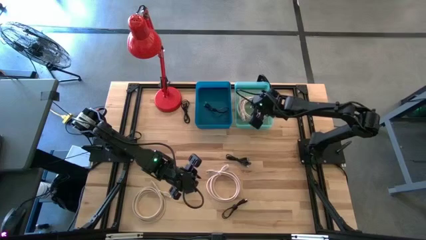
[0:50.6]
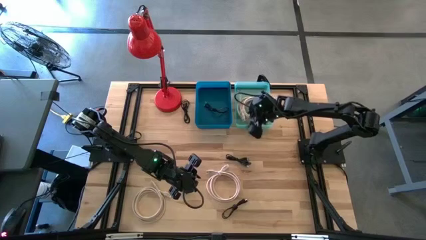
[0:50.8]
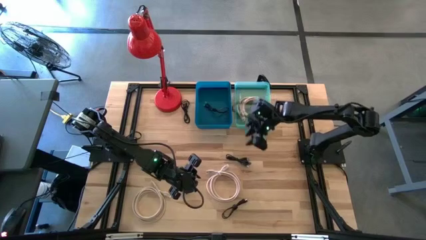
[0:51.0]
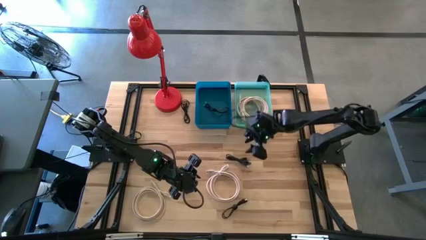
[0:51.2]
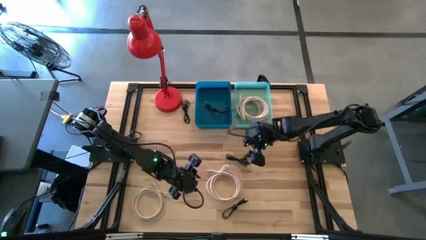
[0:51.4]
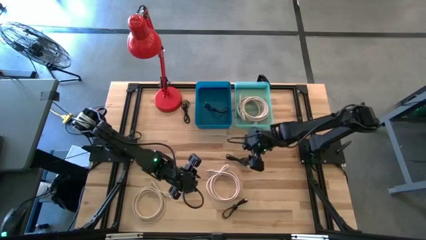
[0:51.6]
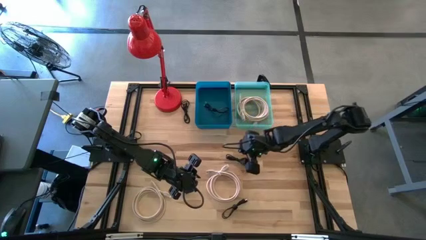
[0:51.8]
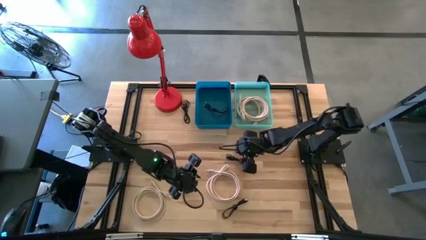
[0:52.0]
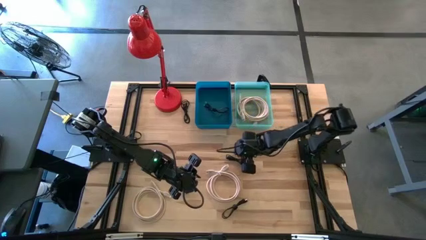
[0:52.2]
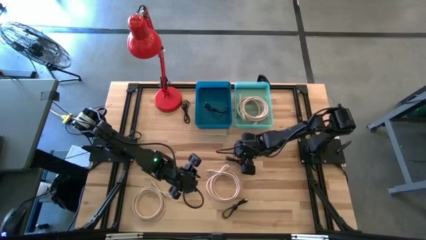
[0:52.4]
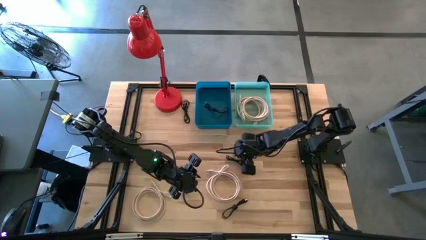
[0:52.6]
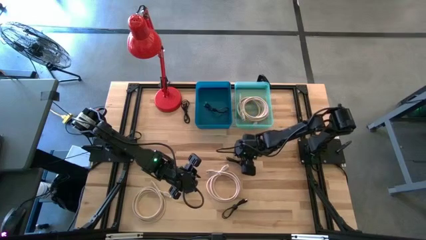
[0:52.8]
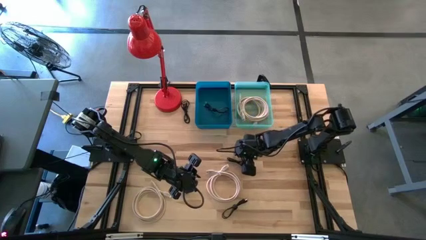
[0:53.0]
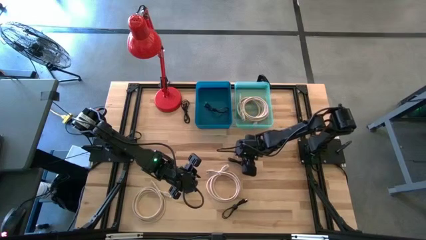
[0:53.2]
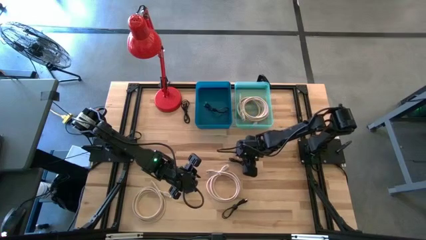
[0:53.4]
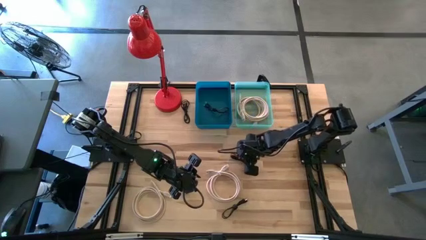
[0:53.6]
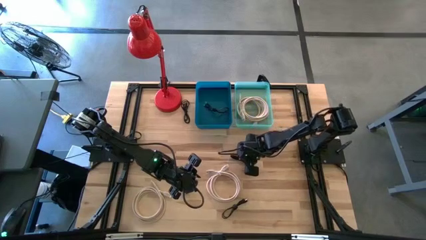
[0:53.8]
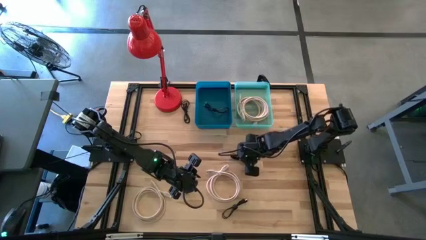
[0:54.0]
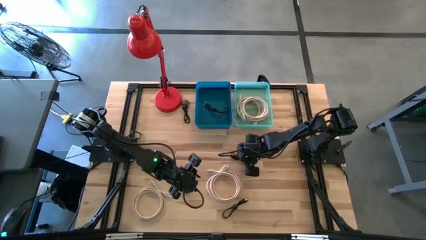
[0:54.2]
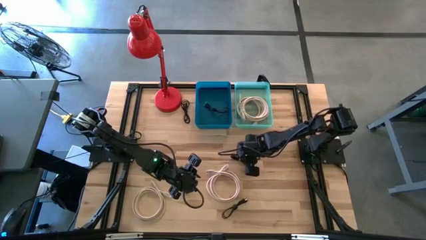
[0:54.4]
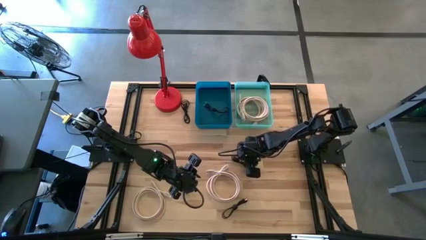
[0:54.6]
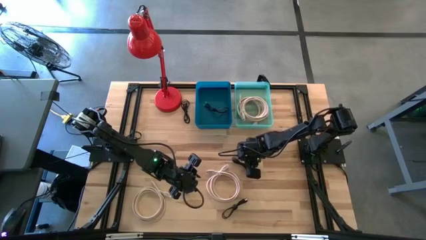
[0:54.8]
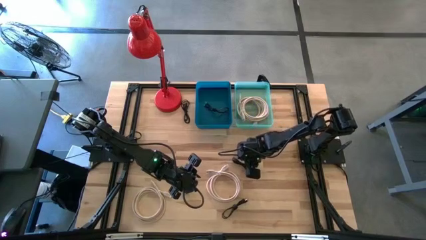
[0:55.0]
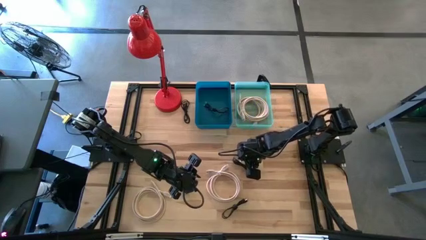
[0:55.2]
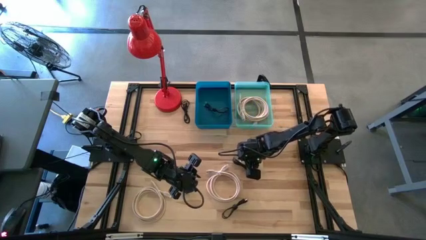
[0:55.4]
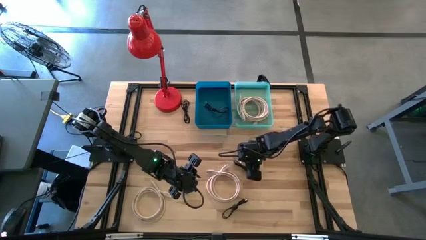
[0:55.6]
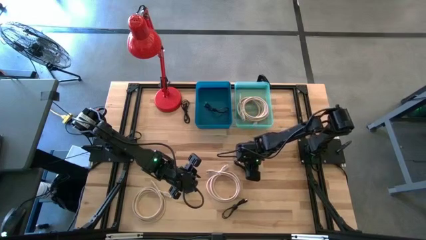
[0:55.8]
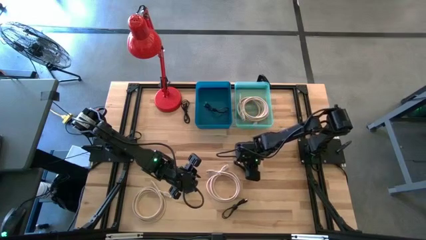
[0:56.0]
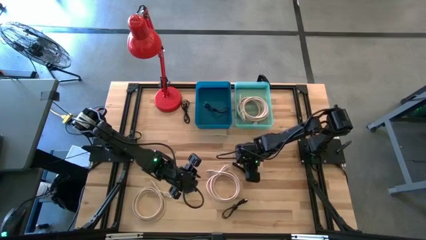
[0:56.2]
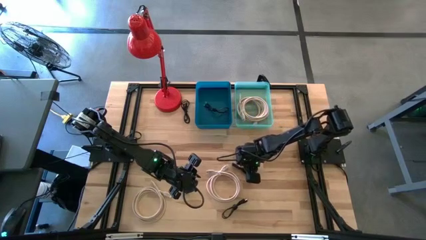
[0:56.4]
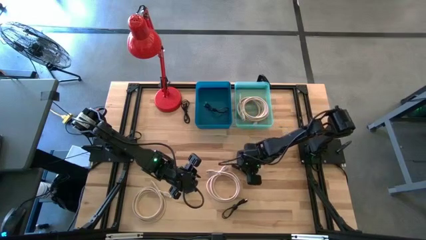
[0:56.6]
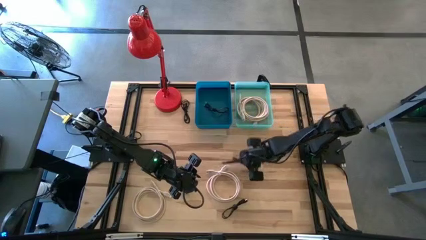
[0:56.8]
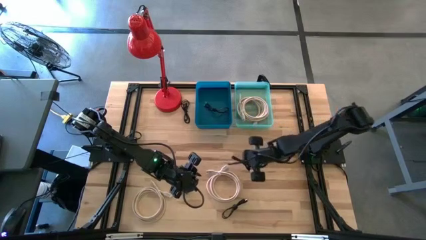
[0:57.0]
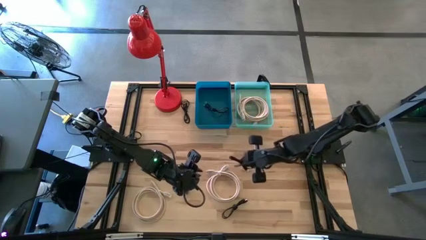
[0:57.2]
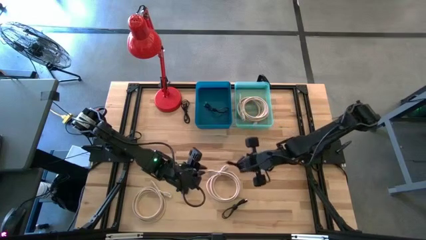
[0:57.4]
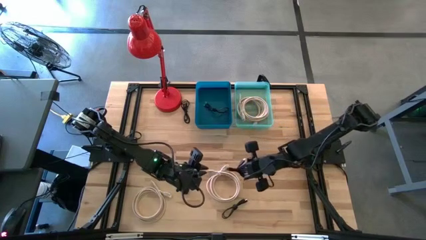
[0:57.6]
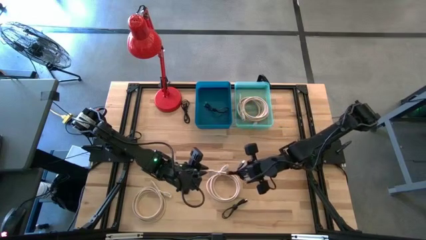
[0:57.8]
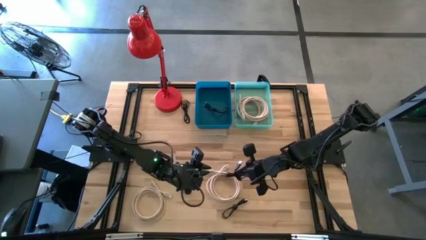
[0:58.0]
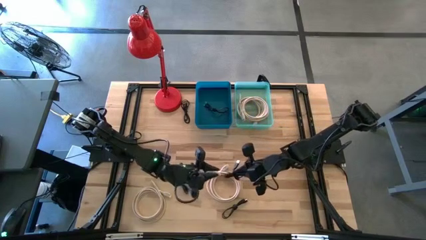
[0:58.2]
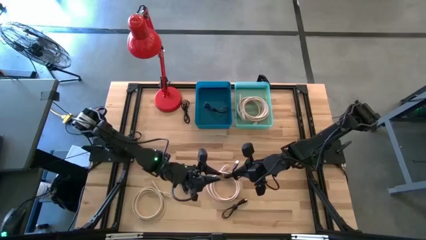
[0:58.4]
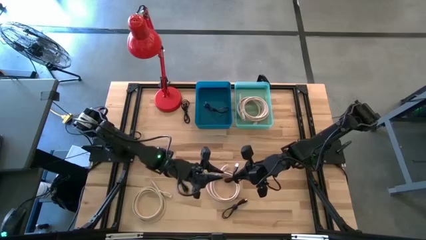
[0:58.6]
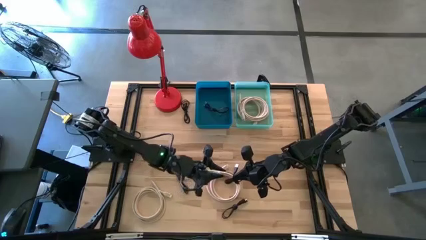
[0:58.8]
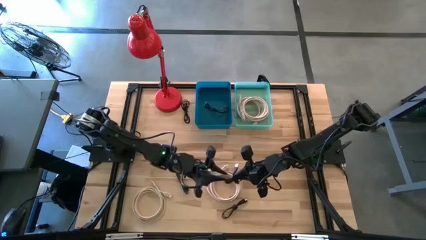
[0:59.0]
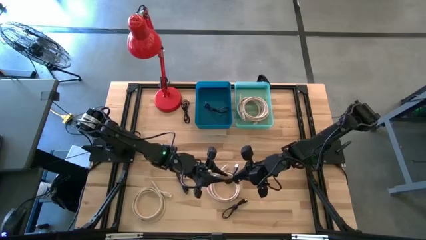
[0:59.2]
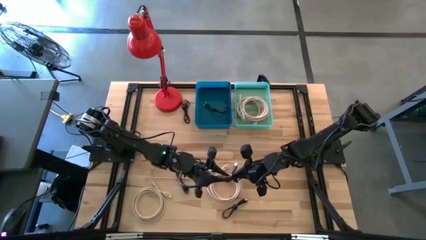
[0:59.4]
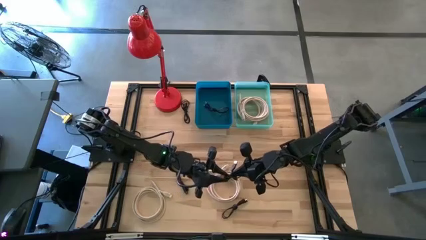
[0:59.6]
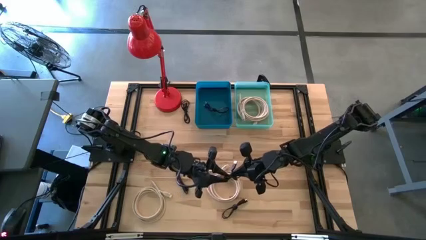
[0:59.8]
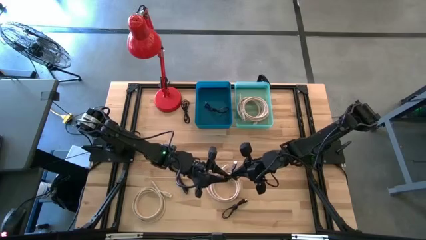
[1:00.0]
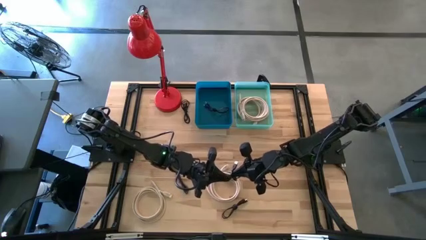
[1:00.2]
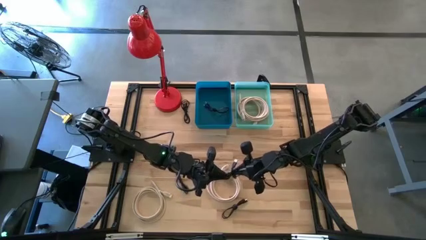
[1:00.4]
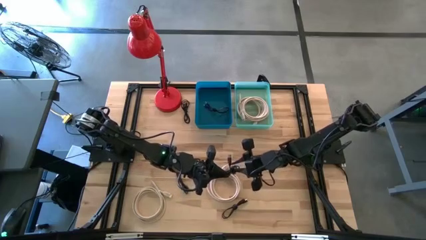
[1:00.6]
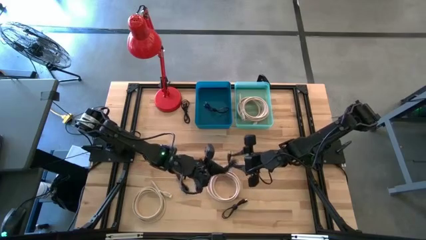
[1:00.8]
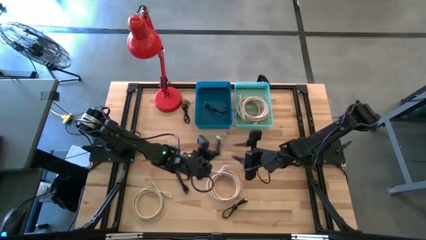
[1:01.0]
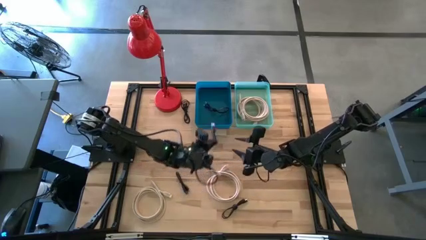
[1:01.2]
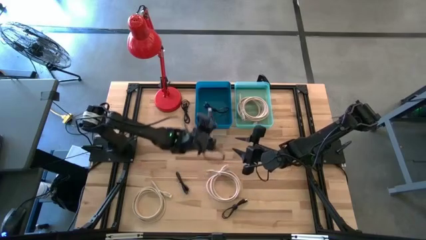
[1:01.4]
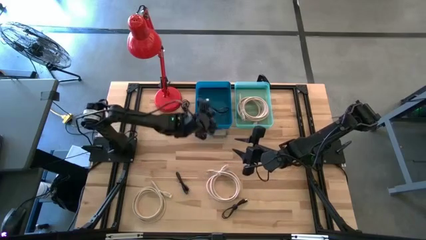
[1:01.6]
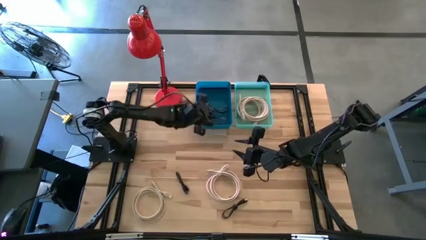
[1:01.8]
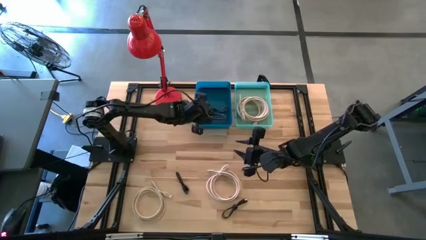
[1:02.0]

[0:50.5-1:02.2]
Task: Pick & Place USB Port
Put the black USB cable into the blue bin

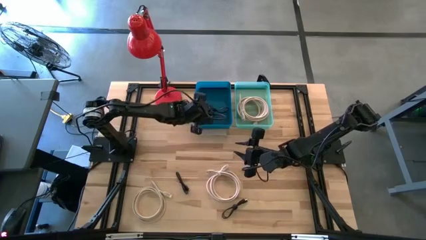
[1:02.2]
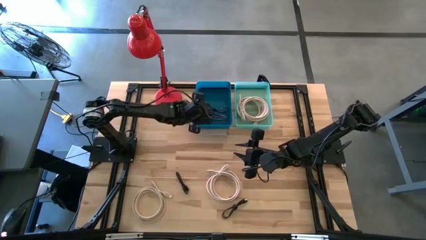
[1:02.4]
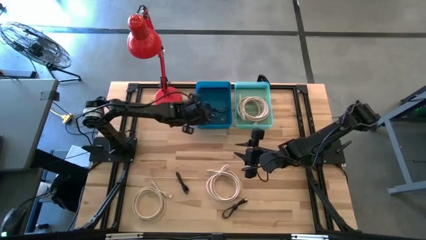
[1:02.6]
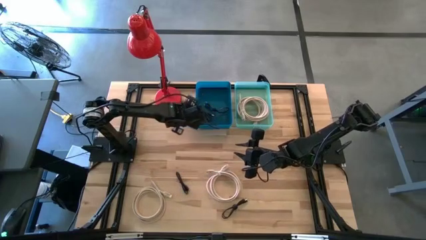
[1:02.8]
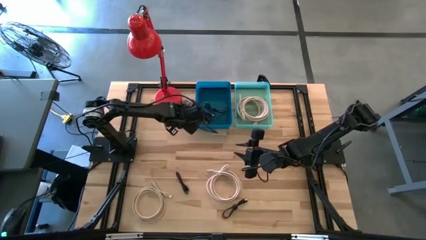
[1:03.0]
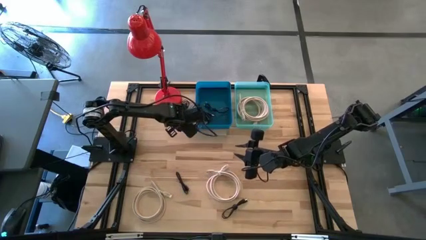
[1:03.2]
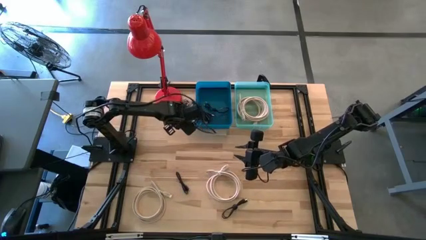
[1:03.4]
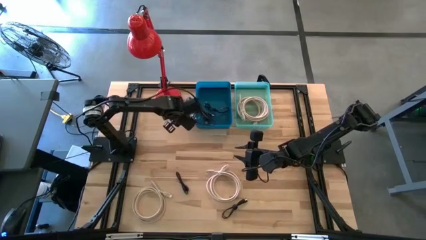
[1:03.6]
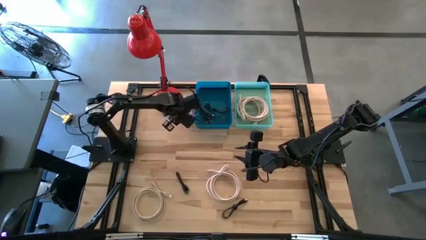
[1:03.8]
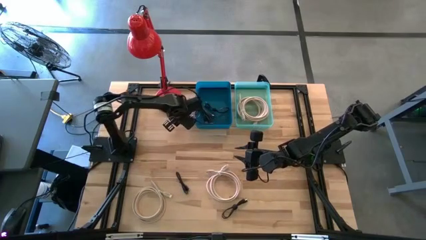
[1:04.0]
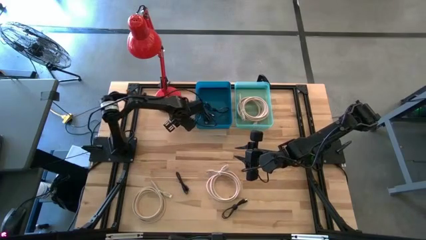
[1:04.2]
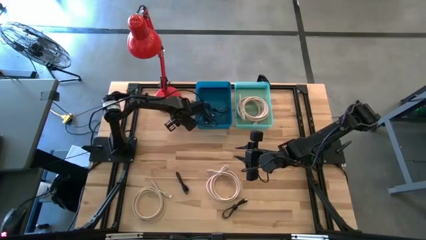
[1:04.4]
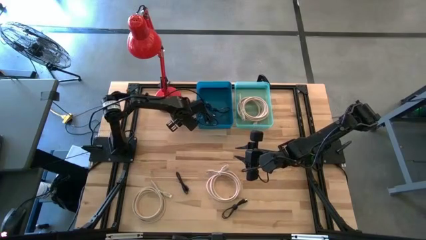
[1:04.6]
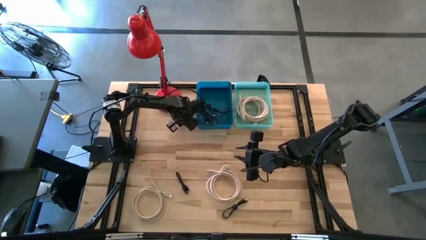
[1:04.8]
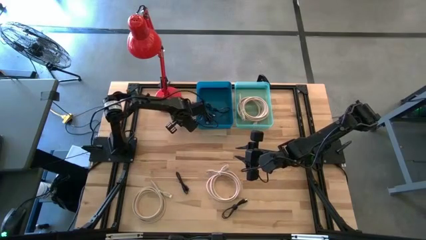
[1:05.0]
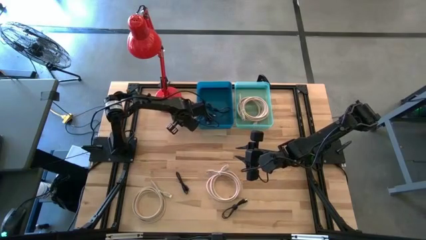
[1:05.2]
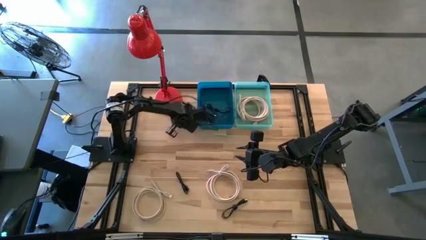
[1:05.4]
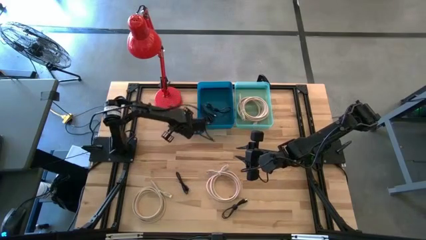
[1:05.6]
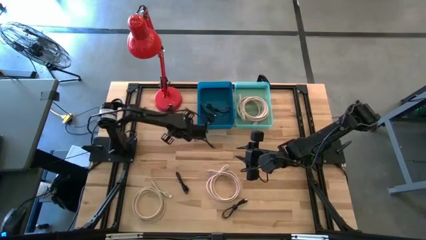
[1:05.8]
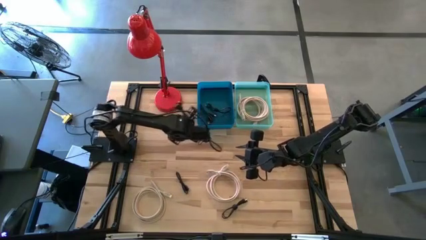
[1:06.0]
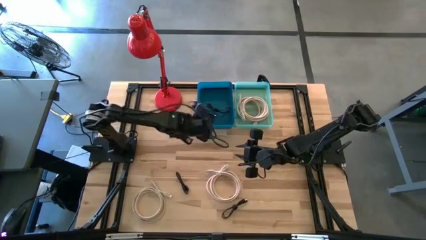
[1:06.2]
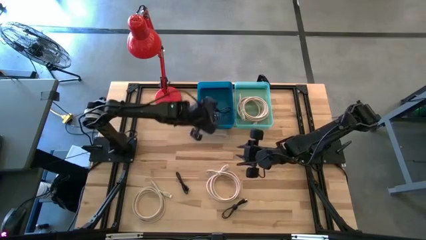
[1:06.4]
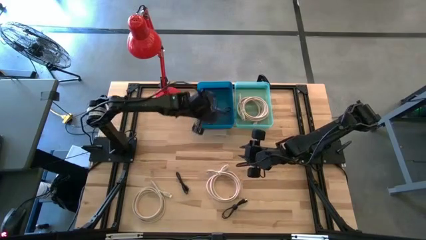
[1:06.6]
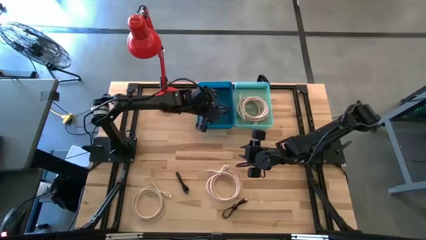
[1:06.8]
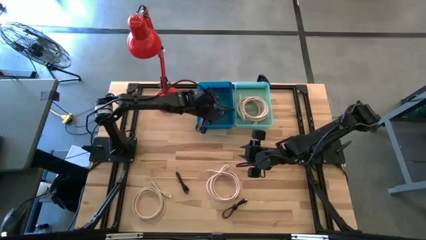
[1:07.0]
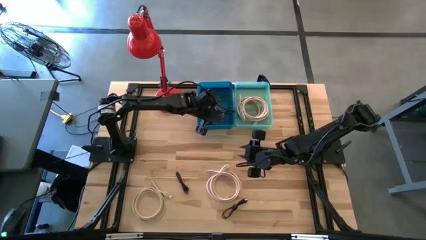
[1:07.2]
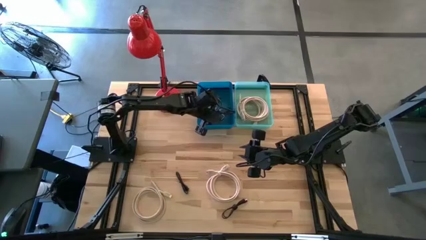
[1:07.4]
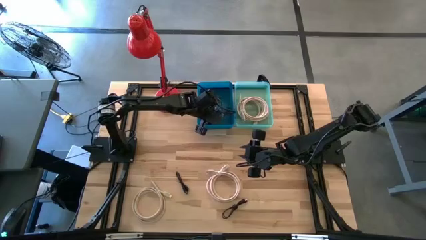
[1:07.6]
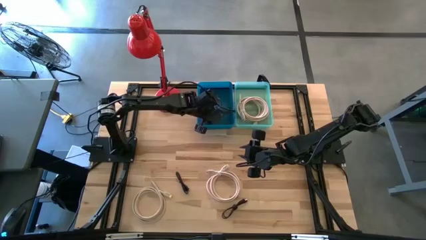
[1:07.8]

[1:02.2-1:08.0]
Put the black USB cable into the blue bin
